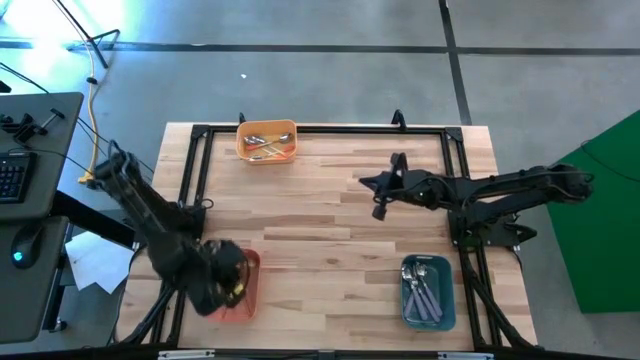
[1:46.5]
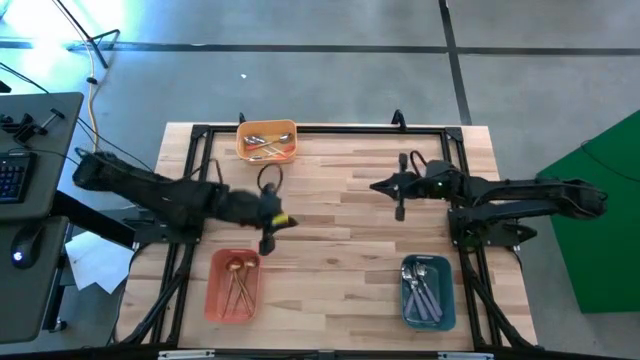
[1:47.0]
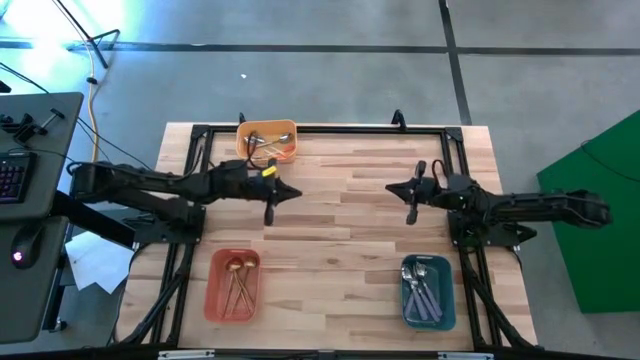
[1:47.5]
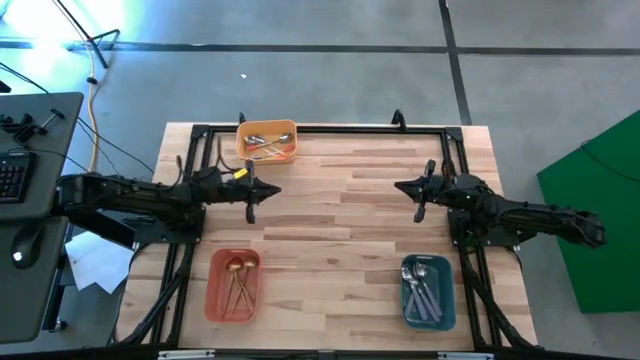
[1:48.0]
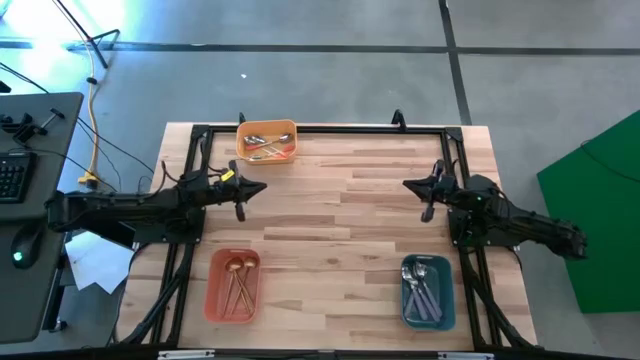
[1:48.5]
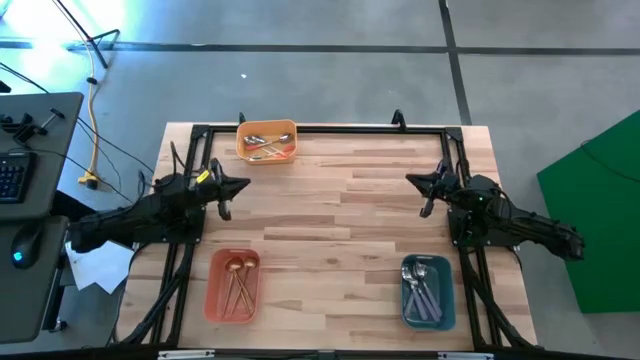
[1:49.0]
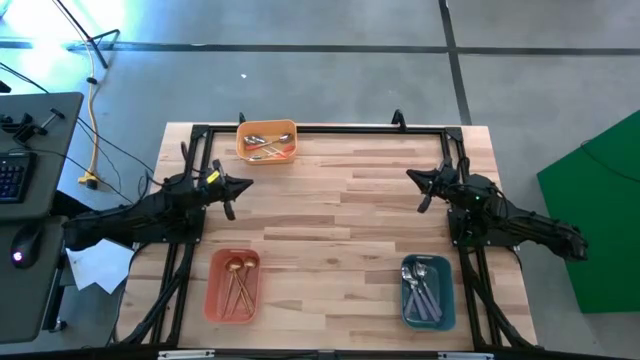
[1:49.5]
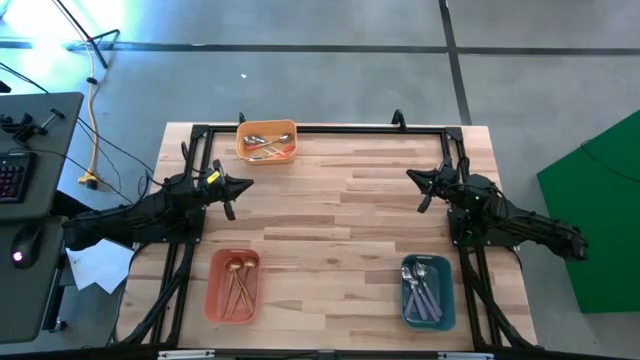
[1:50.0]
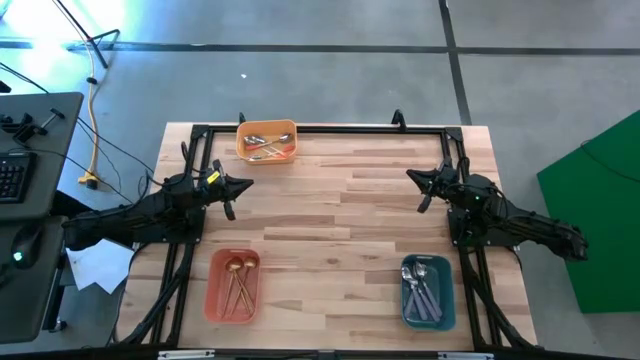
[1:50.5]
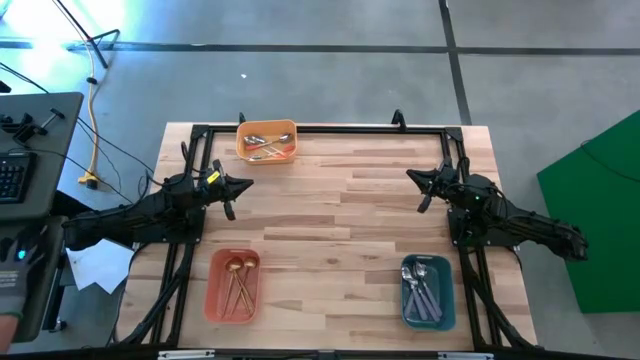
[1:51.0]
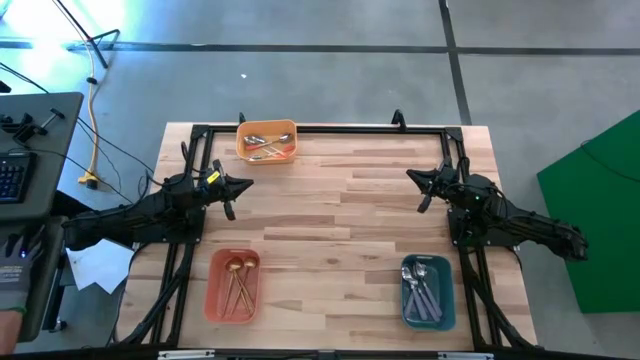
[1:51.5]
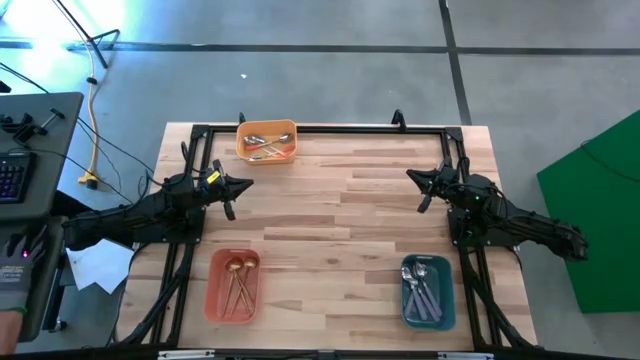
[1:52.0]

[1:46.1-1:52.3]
Task: Sort silverware by color (type)
Return to Home Position

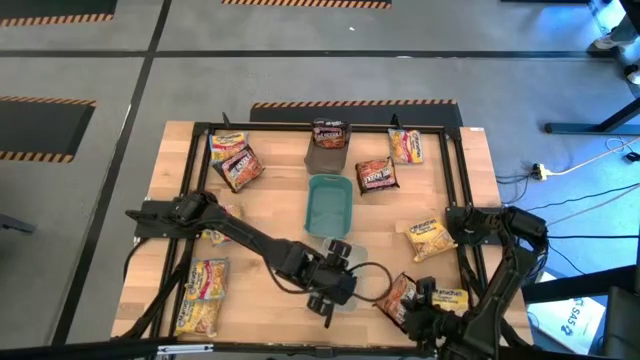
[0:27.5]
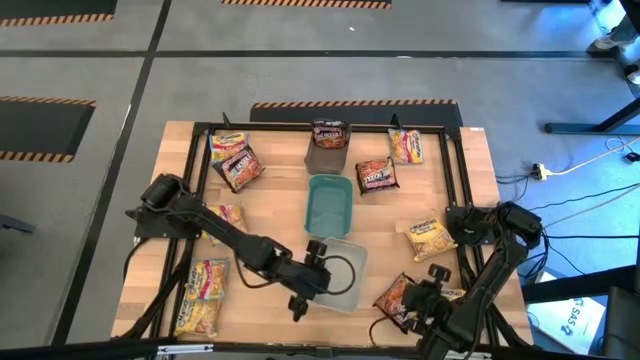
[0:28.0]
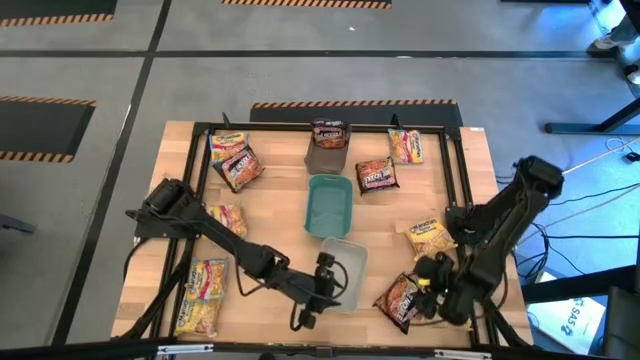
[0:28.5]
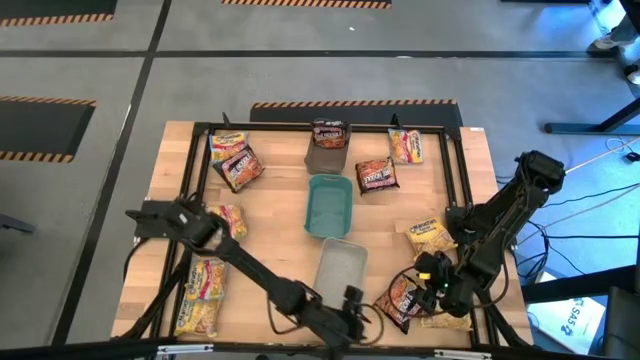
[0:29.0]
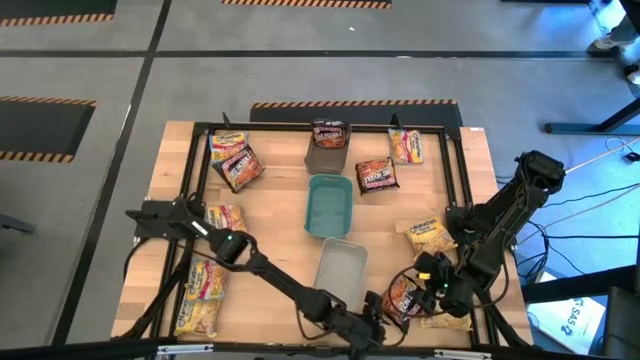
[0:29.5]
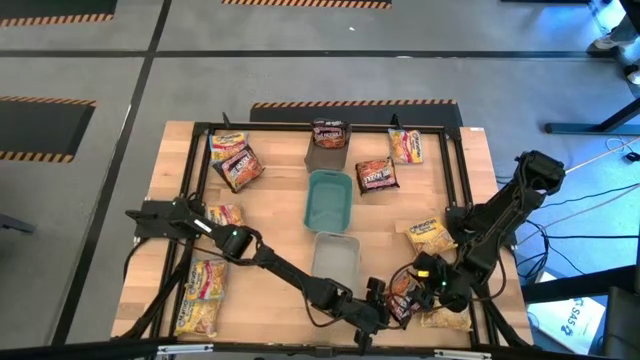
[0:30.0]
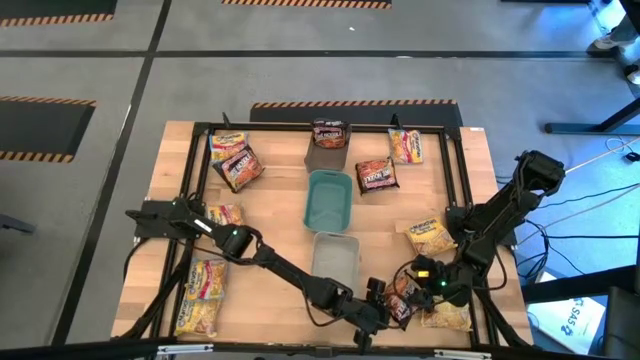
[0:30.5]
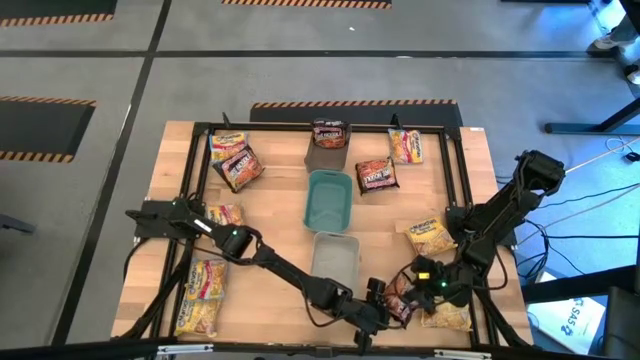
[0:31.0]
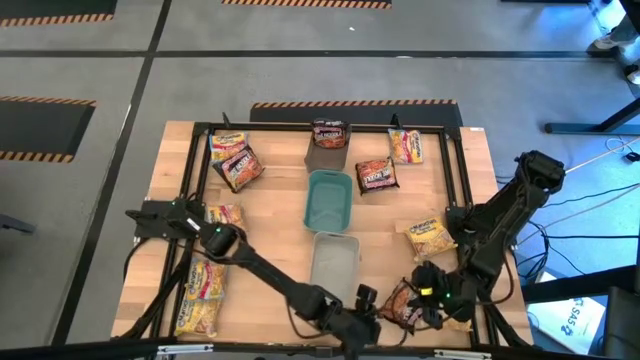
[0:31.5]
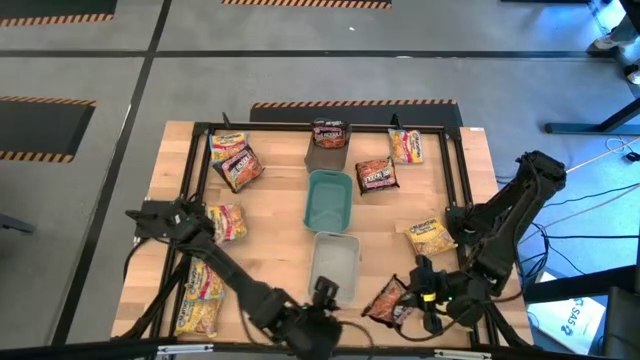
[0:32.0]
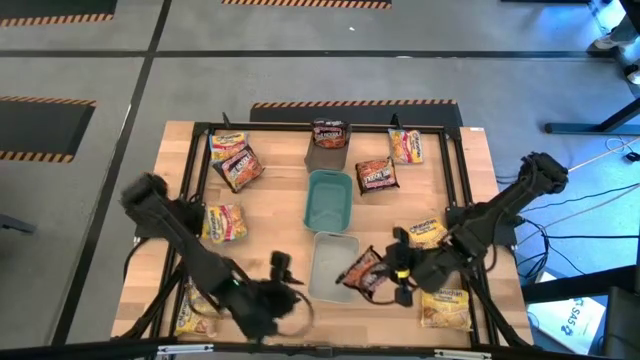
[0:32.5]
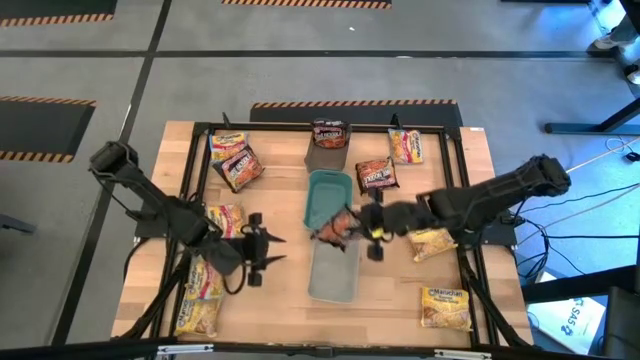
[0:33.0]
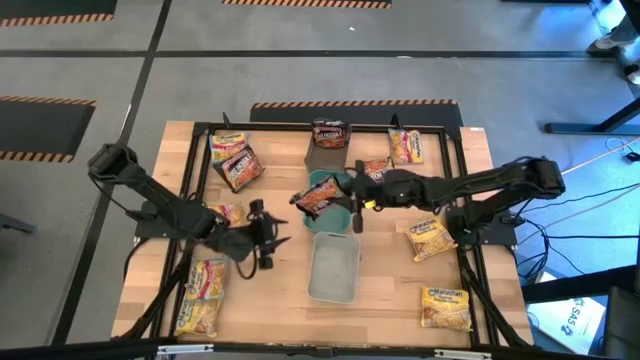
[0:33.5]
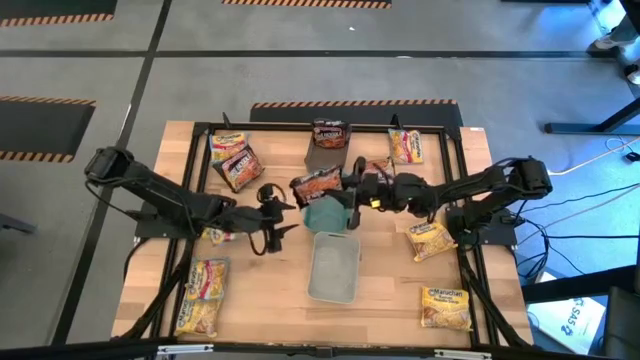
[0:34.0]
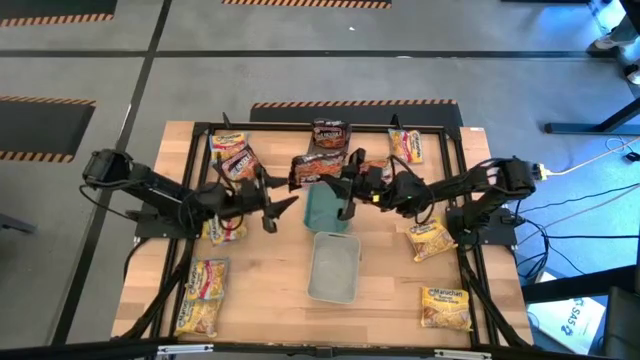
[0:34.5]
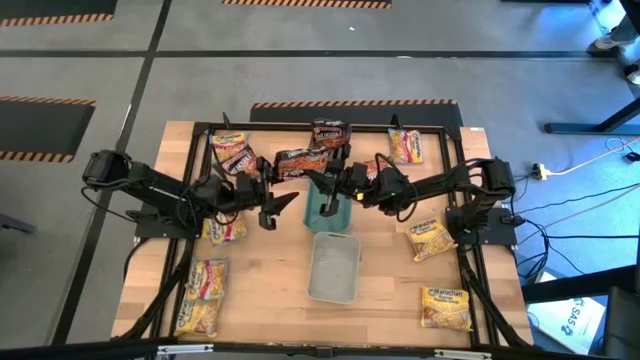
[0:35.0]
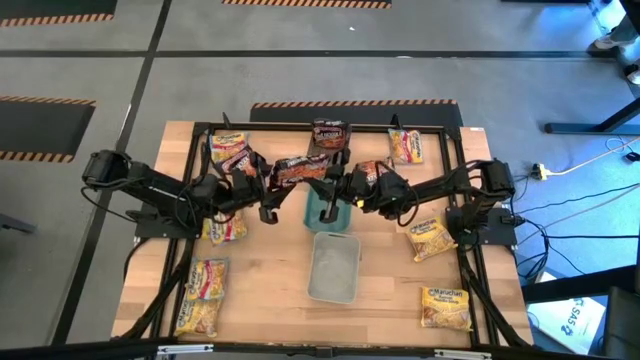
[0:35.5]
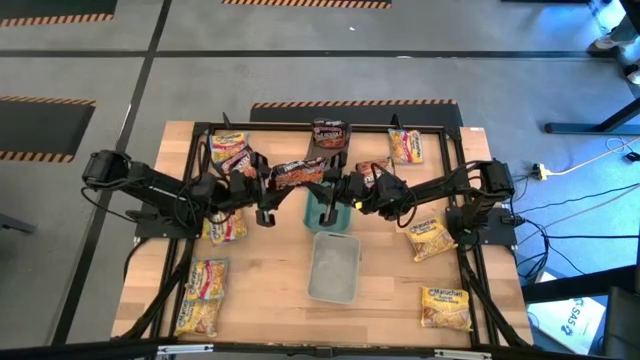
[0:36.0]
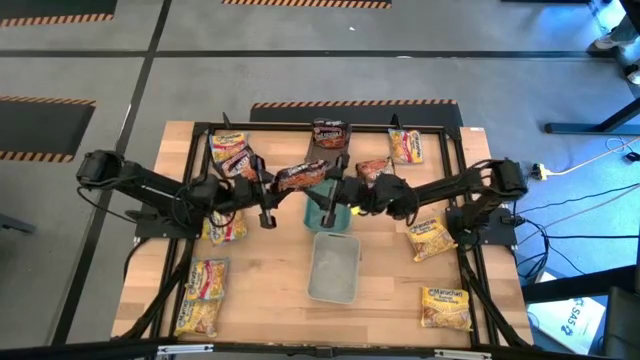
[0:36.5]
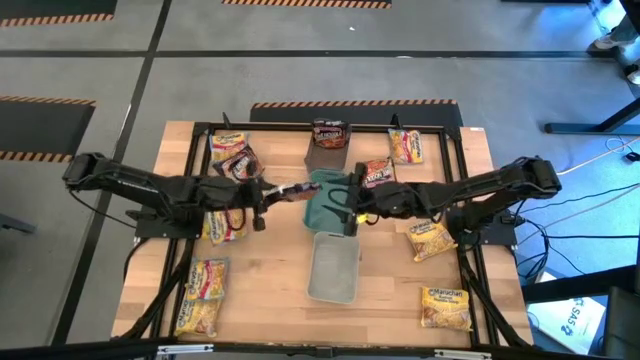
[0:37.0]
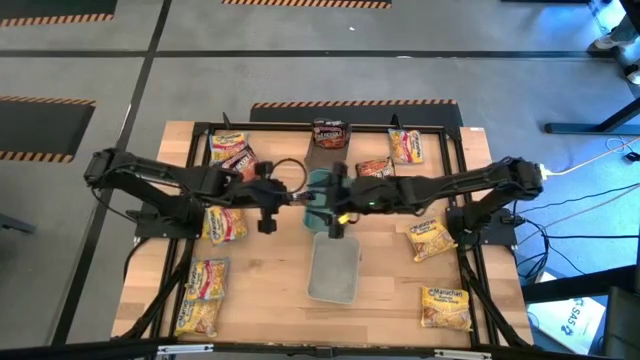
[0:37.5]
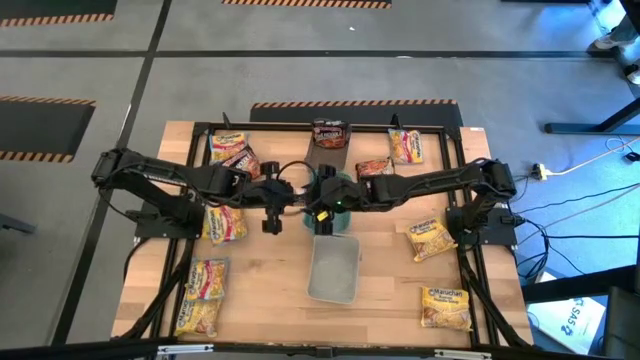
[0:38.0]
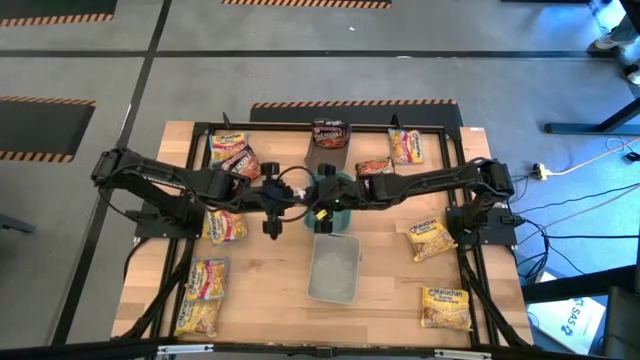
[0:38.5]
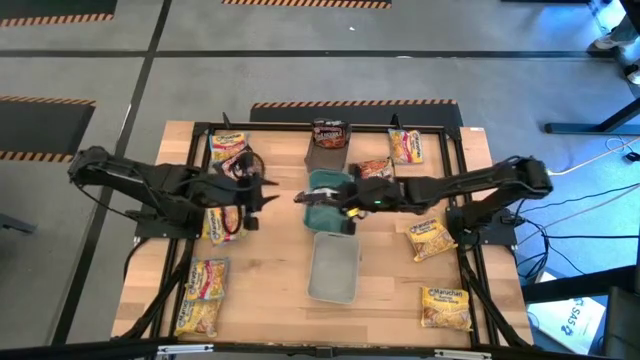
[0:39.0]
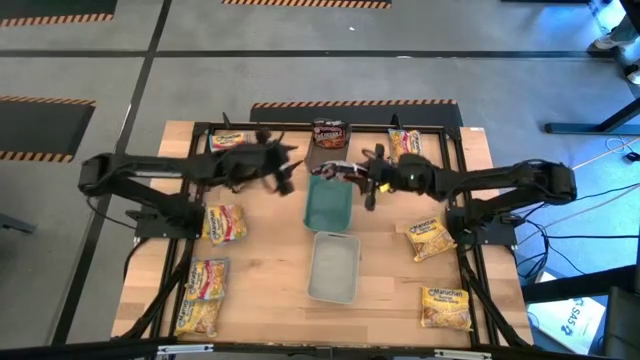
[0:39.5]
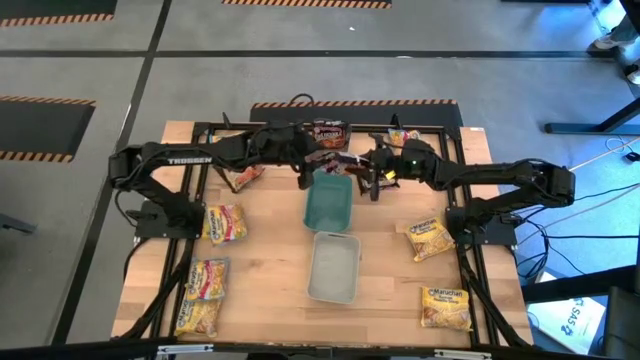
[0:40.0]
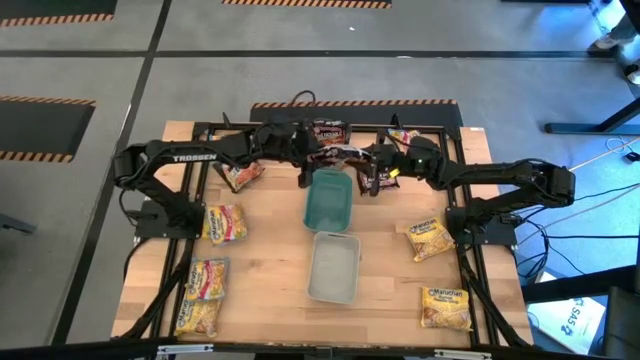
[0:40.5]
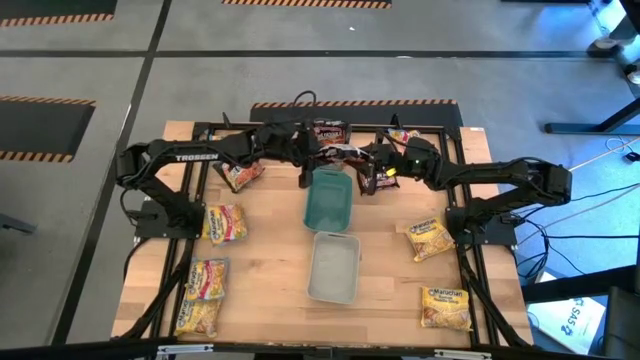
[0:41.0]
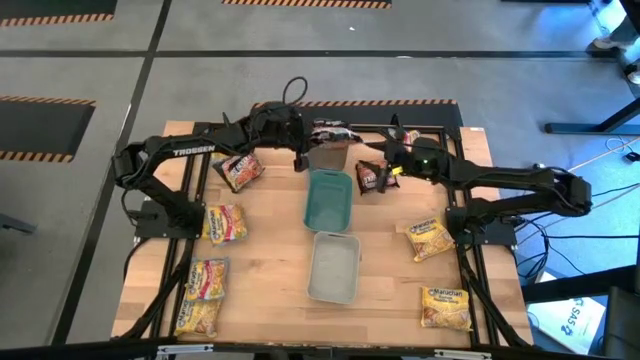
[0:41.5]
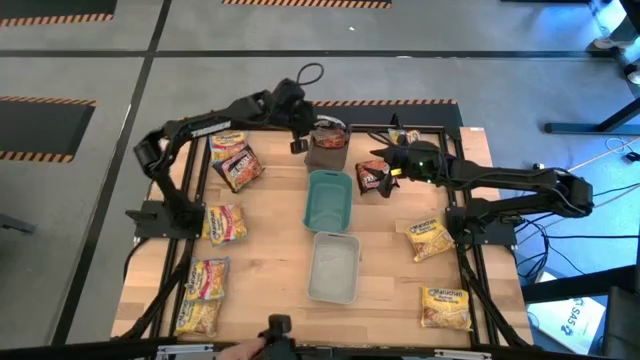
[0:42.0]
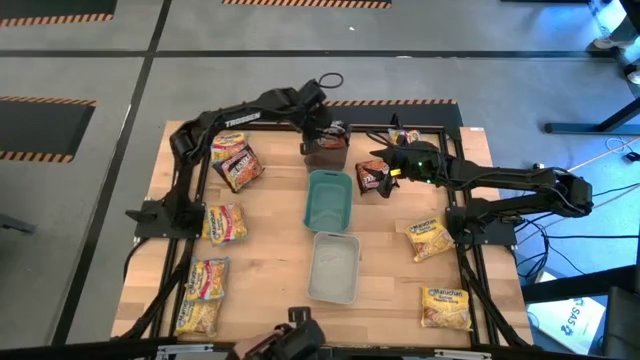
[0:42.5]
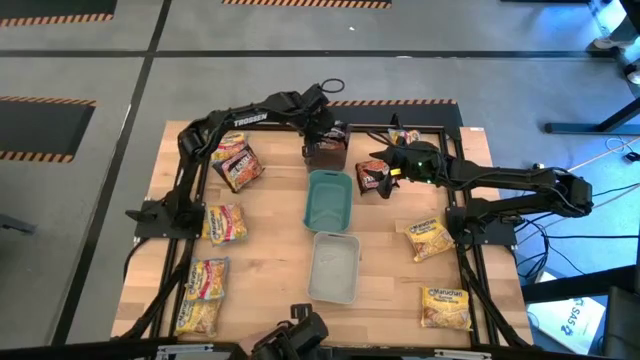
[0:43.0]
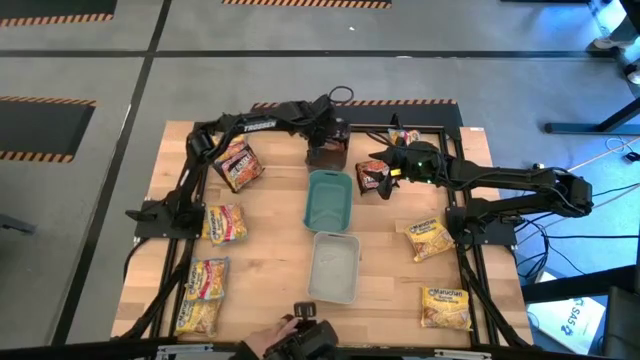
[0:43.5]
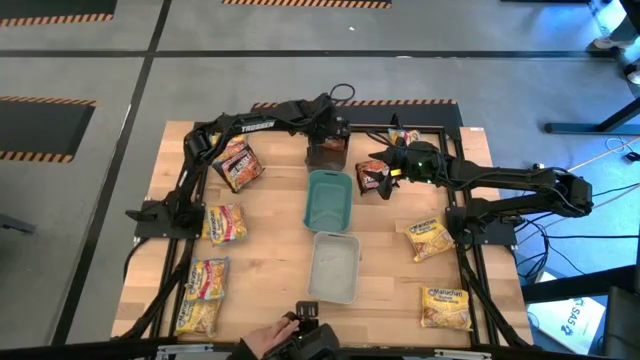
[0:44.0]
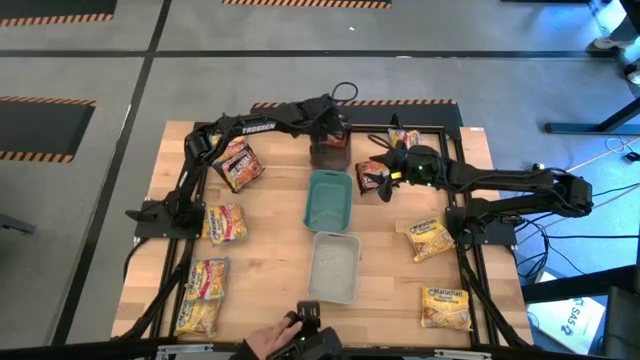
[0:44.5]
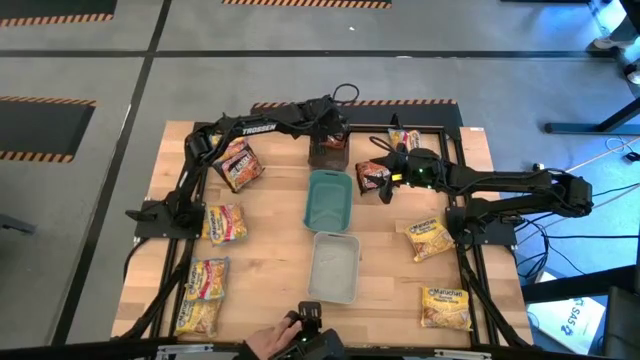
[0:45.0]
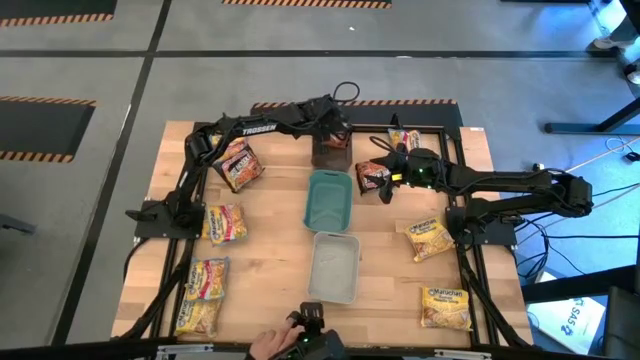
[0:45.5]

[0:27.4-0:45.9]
Task: Sort Maruchan noodles
Put the black noodle pack into the black bin
